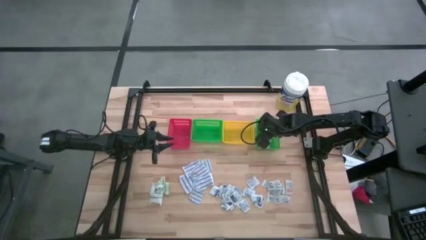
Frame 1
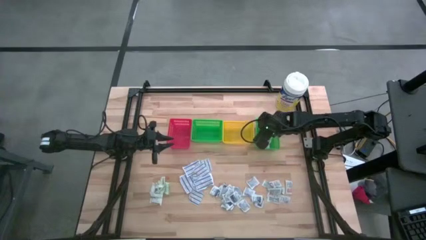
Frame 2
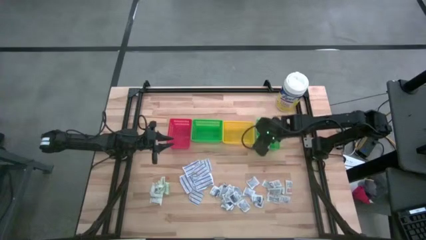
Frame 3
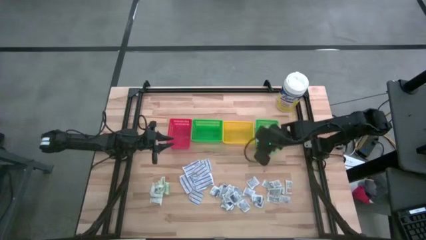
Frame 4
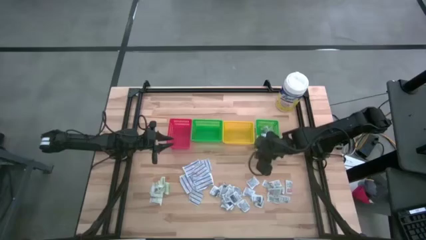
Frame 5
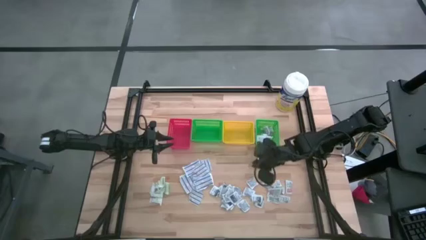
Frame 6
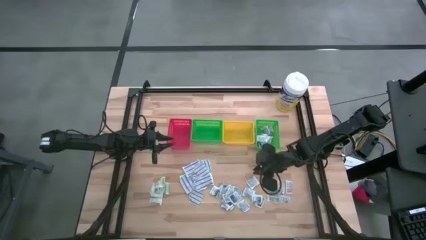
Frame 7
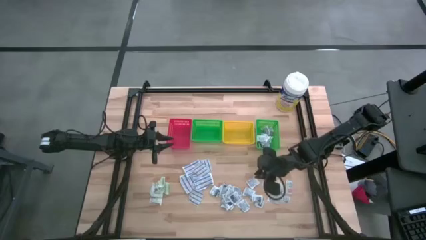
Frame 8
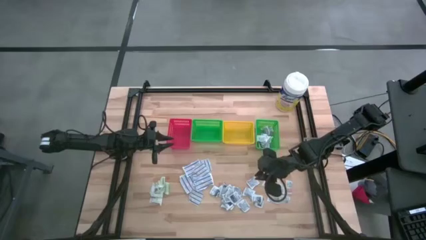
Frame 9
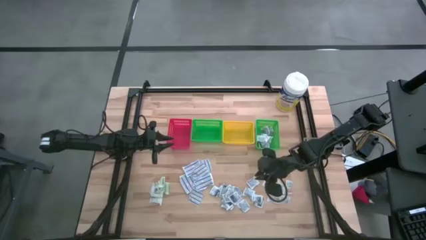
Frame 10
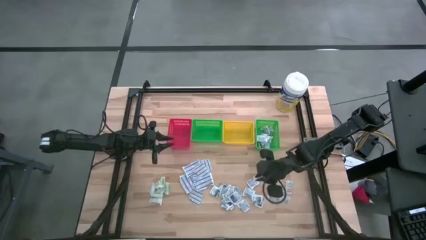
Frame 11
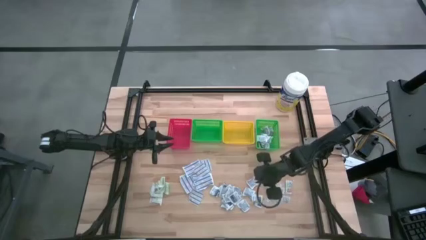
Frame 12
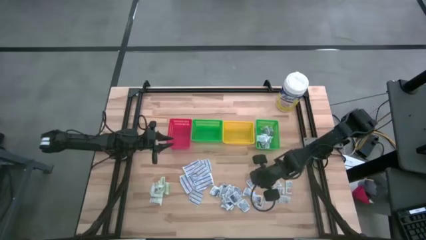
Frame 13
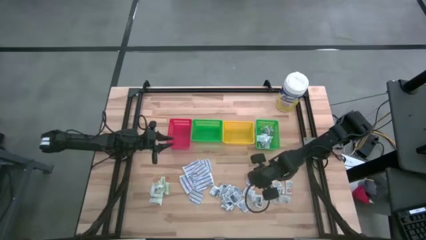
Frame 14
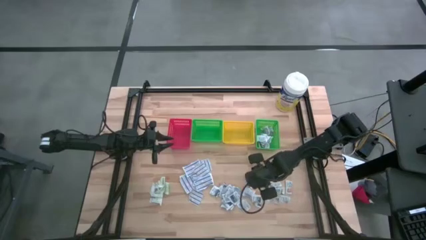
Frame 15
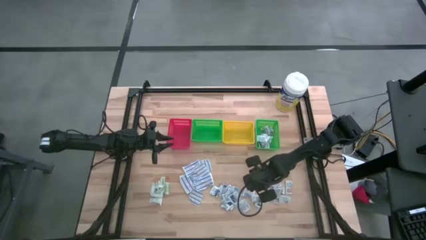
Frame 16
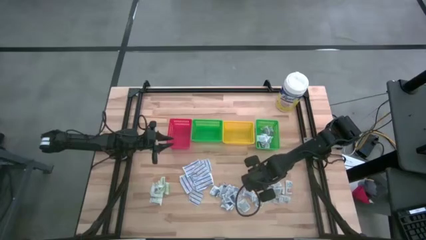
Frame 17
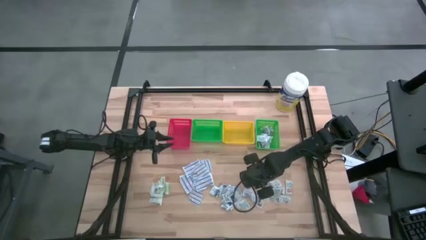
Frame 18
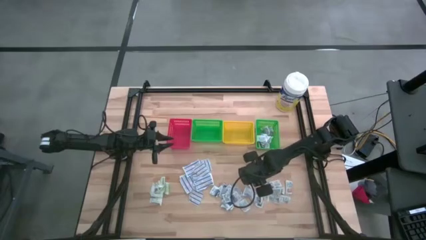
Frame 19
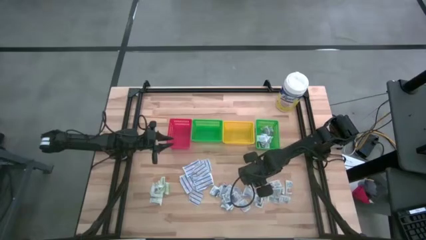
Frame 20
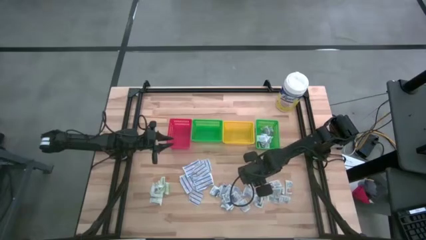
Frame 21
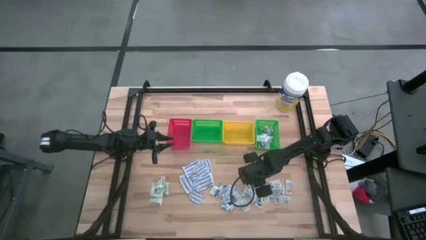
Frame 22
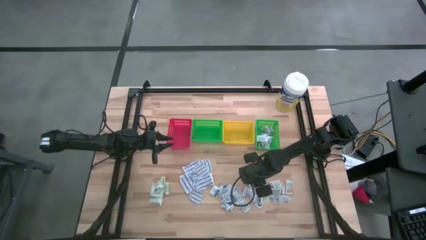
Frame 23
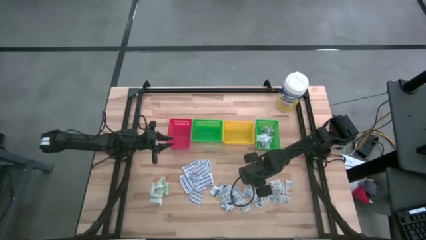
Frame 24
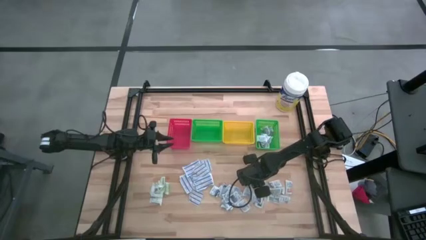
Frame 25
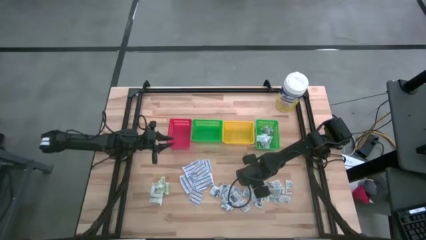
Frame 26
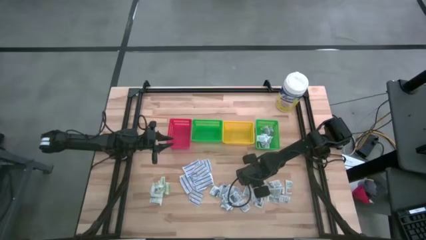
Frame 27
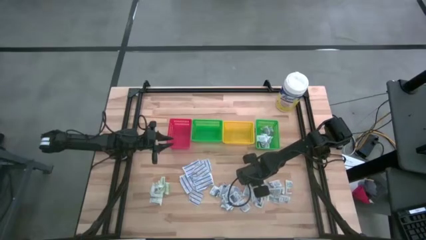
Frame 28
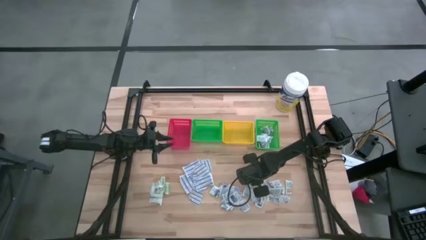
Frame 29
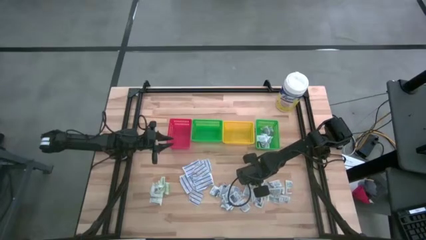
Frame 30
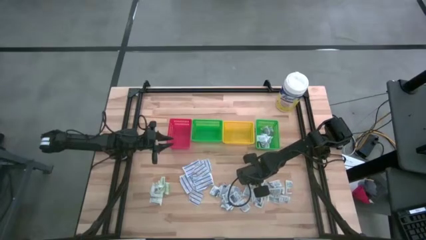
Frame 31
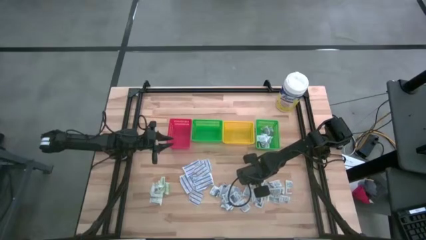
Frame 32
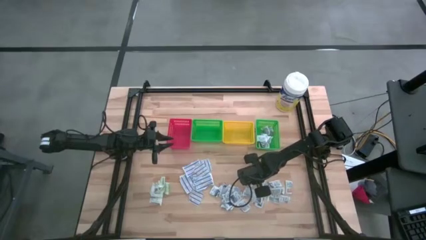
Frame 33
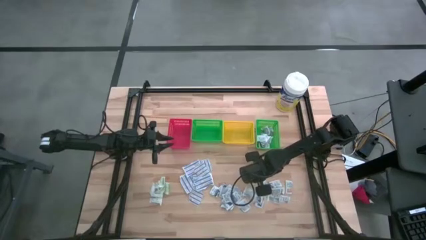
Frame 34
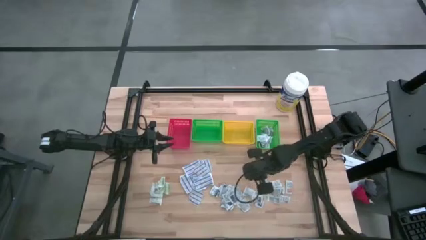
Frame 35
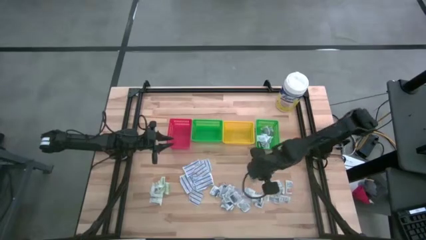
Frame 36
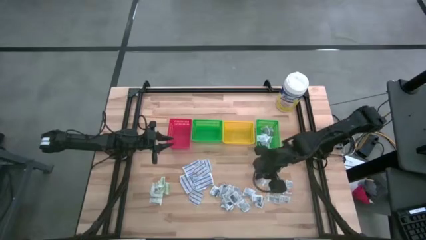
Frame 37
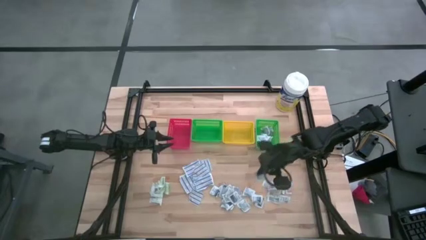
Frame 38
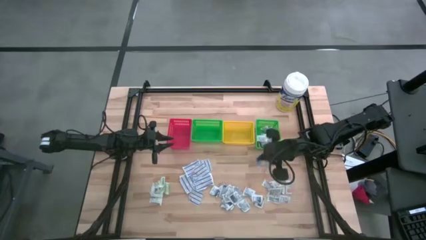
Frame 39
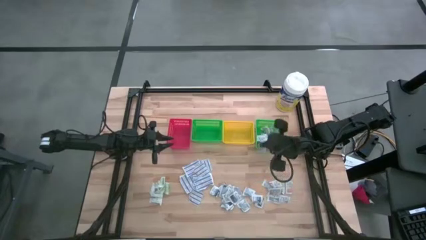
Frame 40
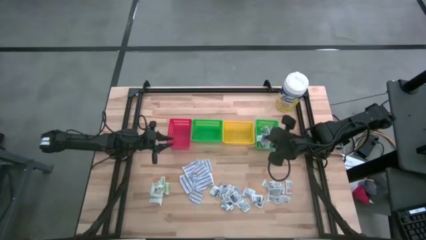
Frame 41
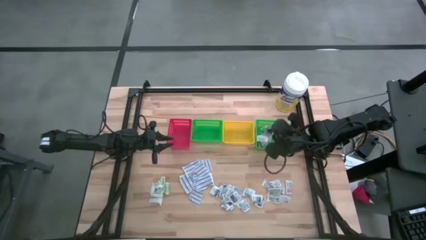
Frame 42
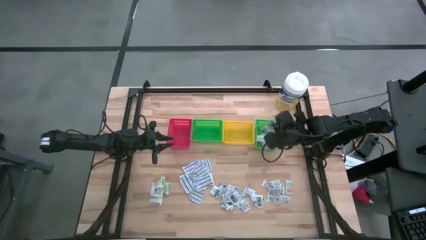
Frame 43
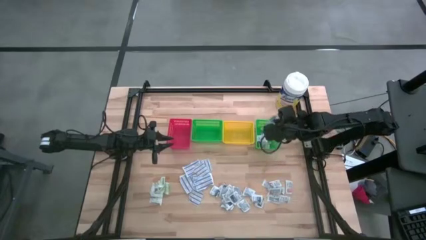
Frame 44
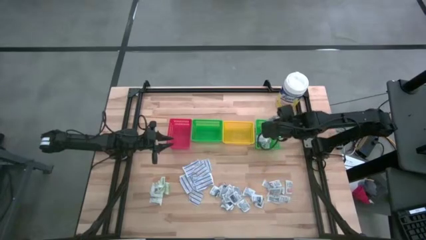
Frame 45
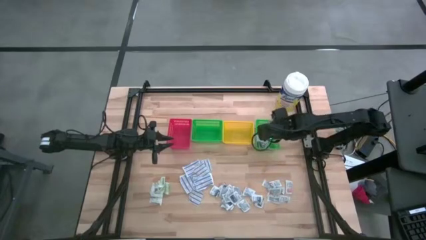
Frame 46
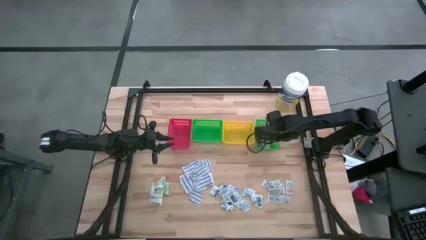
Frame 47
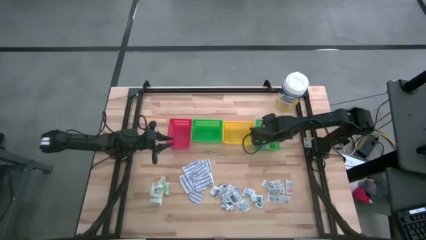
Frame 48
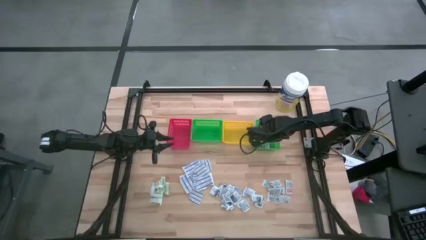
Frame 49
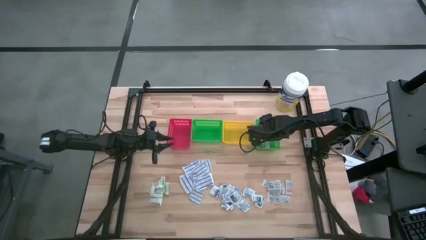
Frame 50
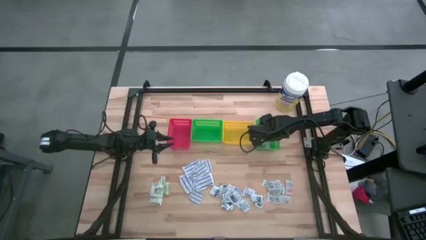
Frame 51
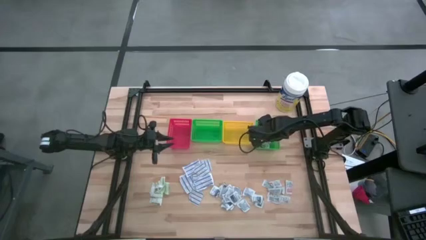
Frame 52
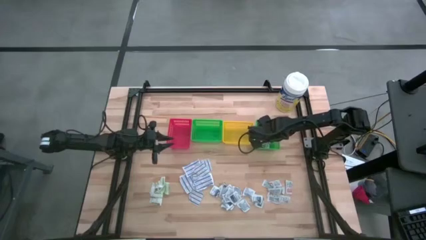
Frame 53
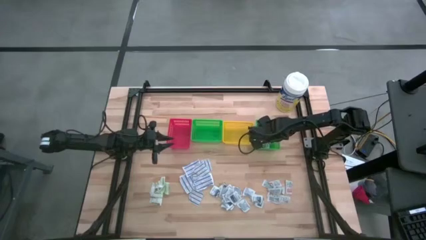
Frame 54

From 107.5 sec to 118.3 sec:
Task: Pick & Place First Aid Supplies
Put the blue alcohol pad into the right green bin

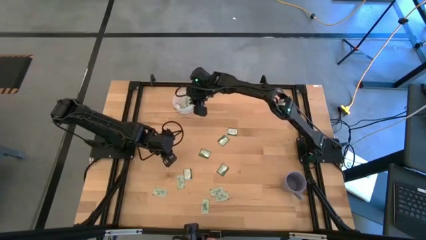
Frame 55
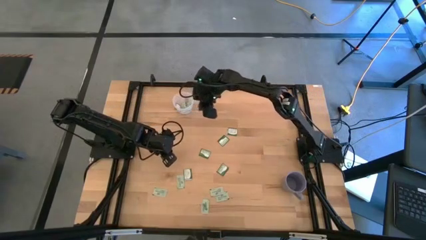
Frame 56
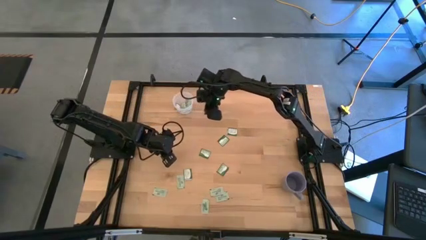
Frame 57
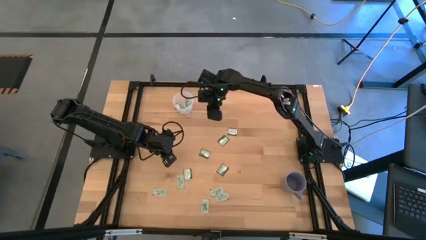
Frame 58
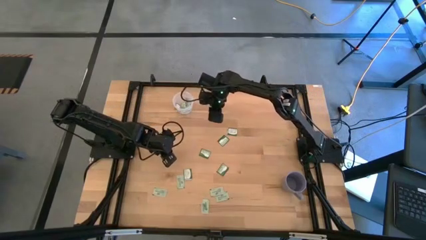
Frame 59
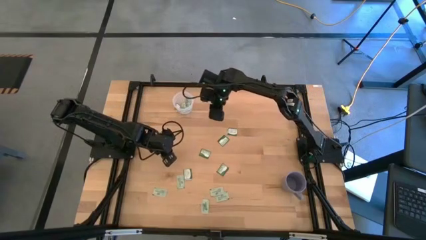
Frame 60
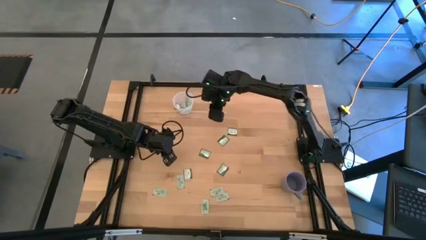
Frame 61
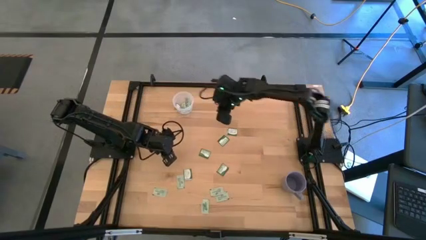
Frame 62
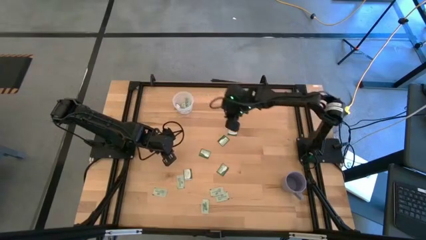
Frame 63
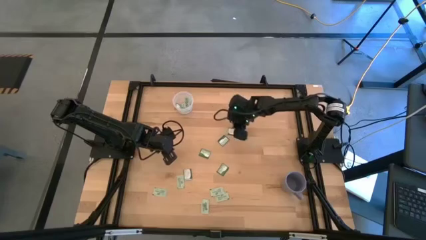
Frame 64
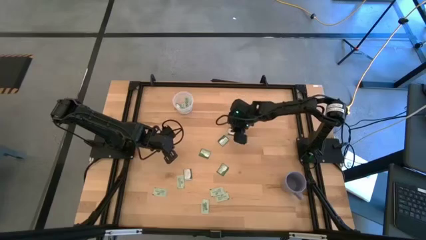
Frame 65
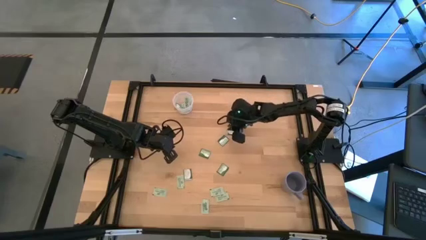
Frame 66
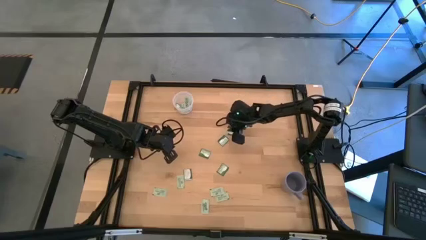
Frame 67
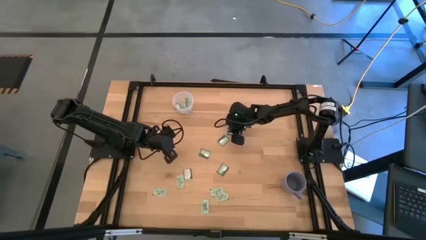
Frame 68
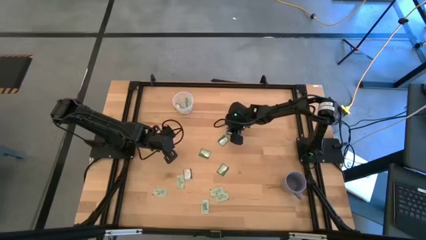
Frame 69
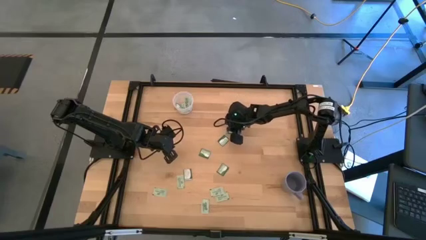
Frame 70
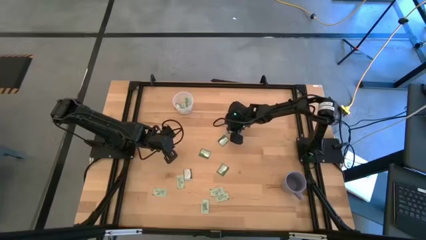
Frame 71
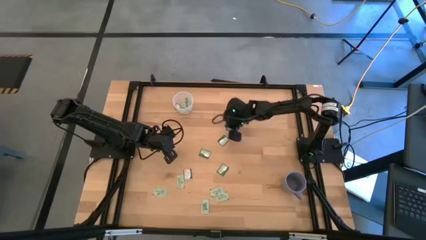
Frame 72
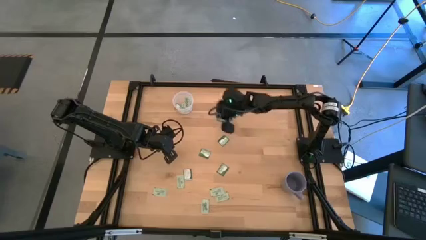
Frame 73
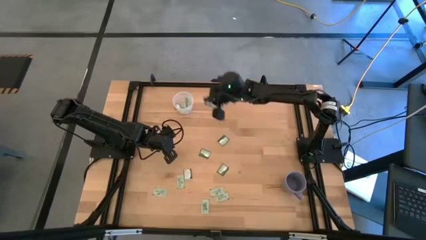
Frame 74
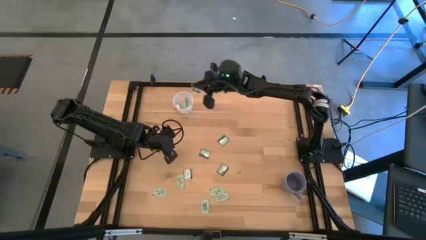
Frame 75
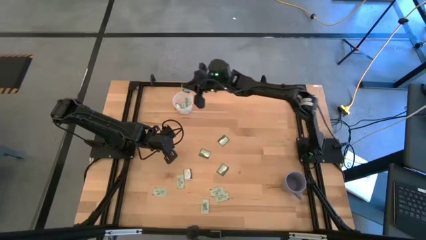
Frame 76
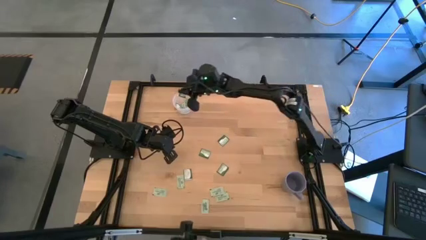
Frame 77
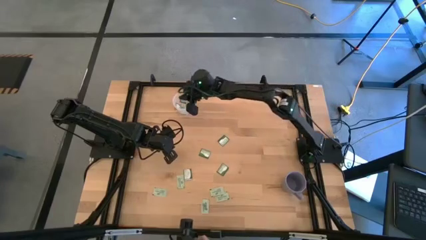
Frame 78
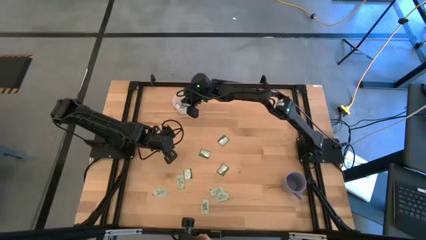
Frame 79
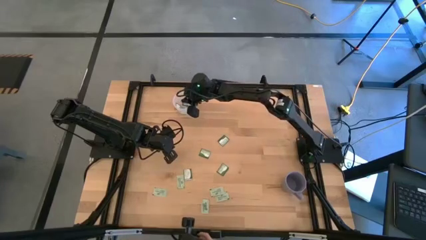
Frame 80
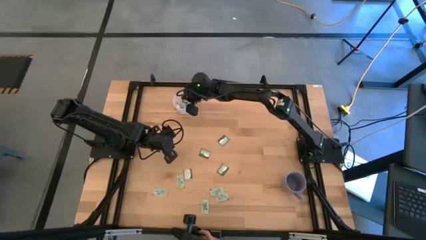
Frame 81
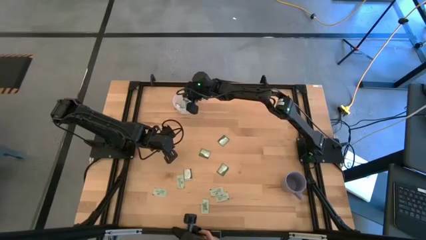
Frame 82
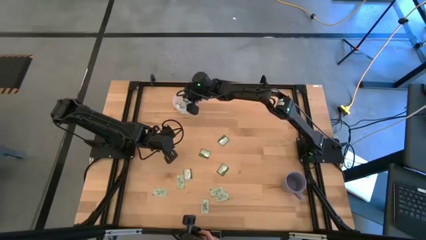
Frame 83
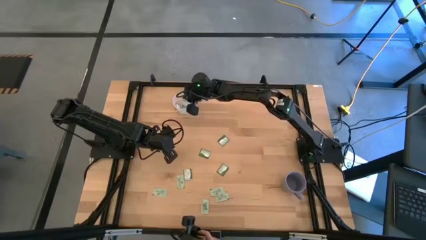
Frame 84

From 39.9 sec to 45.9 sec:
Task: Pick and place items into bin
Put the truvia packet into the transparent bin
